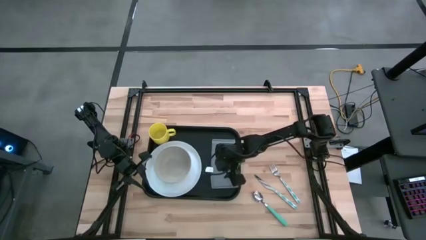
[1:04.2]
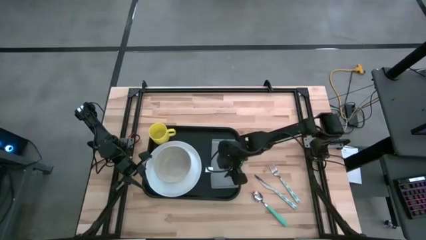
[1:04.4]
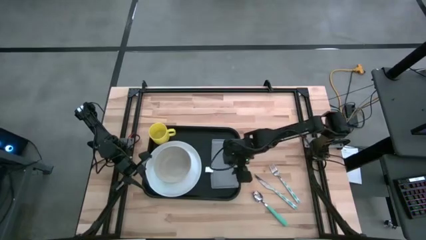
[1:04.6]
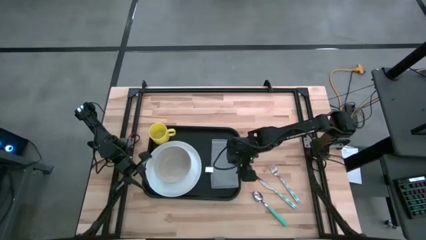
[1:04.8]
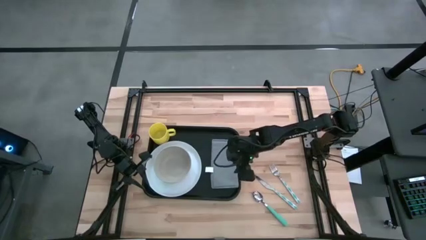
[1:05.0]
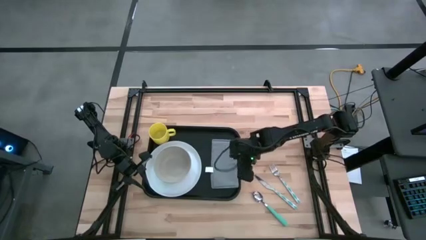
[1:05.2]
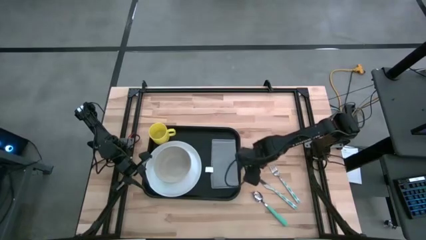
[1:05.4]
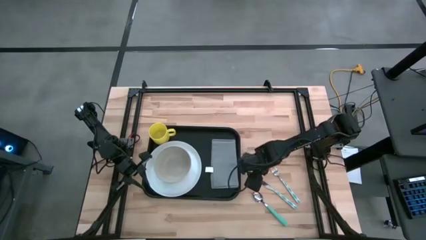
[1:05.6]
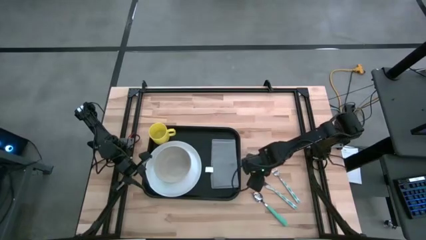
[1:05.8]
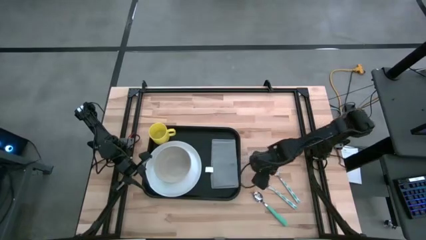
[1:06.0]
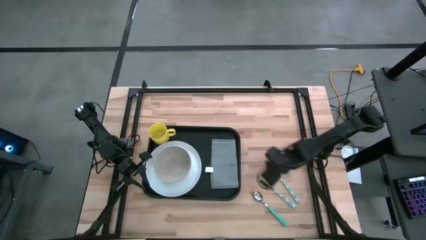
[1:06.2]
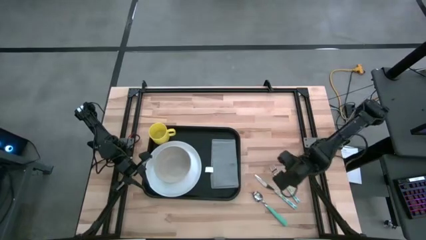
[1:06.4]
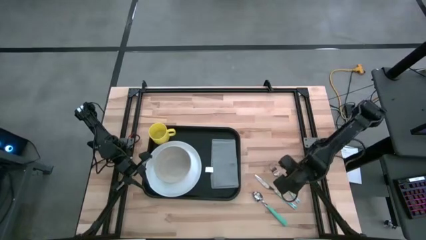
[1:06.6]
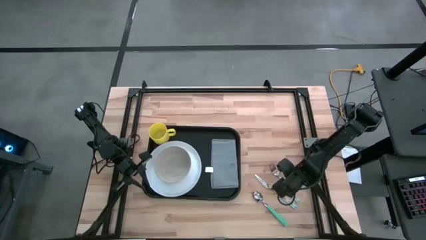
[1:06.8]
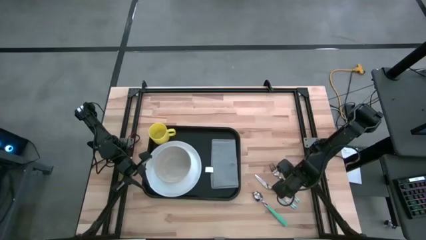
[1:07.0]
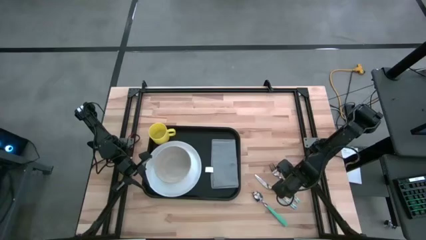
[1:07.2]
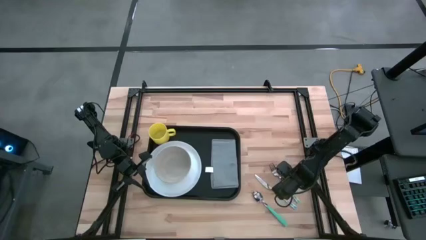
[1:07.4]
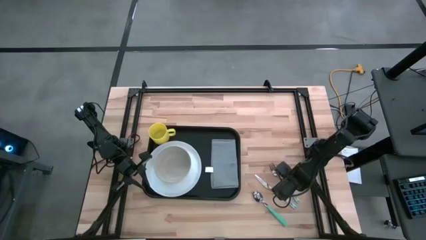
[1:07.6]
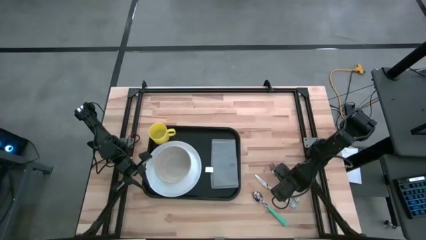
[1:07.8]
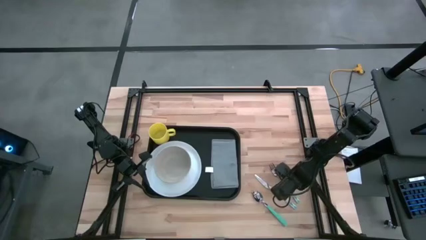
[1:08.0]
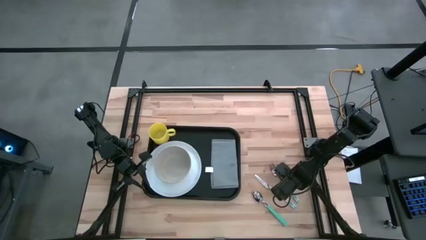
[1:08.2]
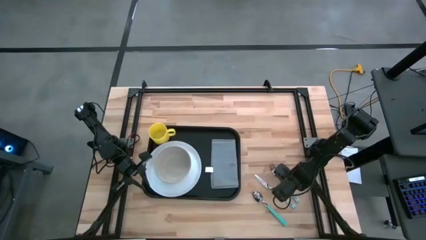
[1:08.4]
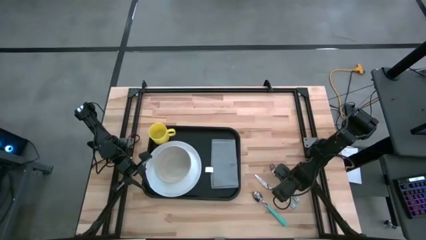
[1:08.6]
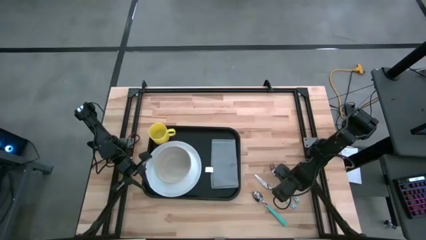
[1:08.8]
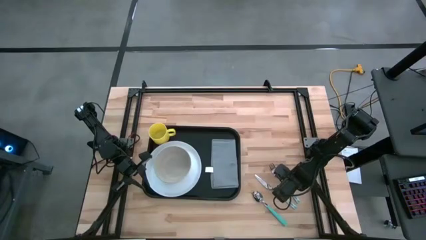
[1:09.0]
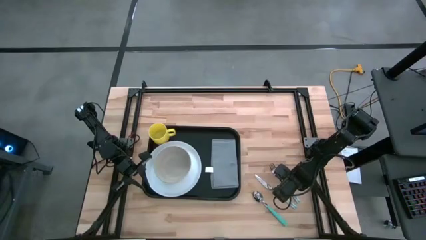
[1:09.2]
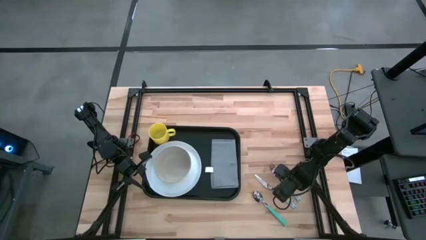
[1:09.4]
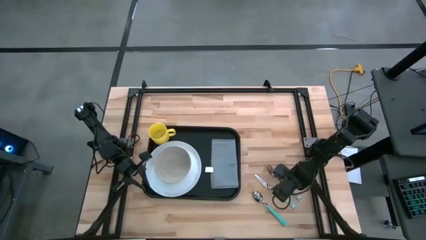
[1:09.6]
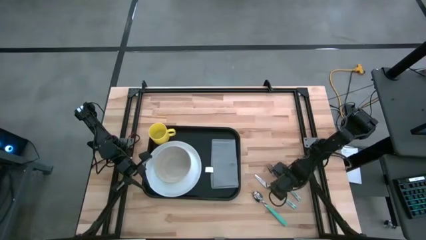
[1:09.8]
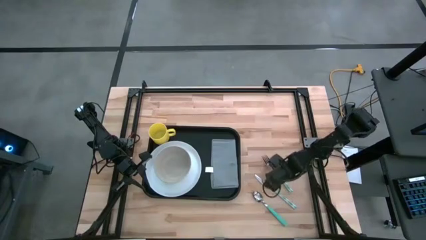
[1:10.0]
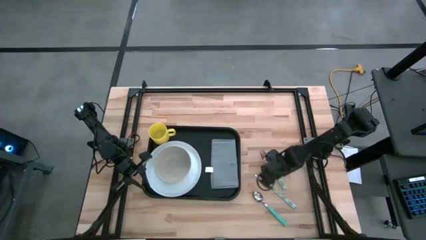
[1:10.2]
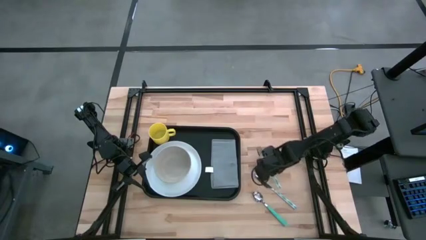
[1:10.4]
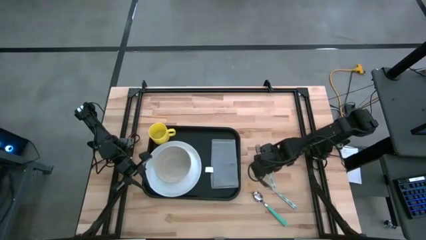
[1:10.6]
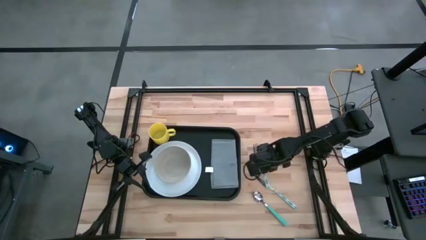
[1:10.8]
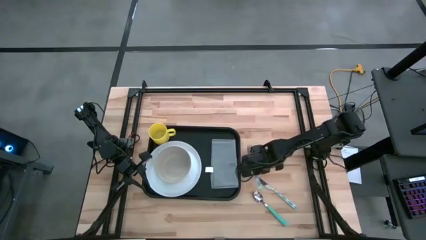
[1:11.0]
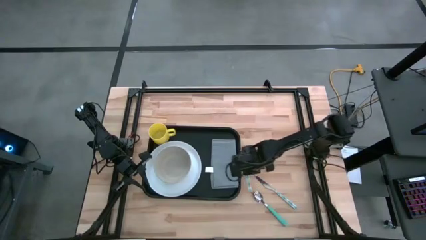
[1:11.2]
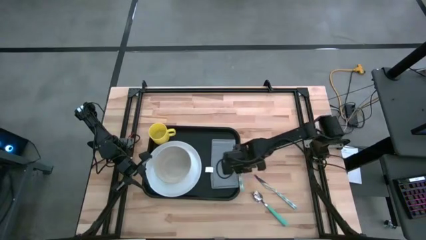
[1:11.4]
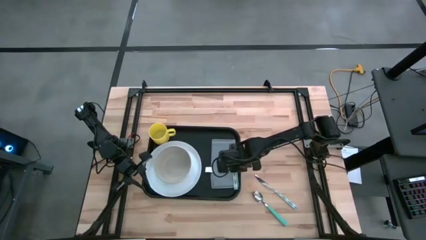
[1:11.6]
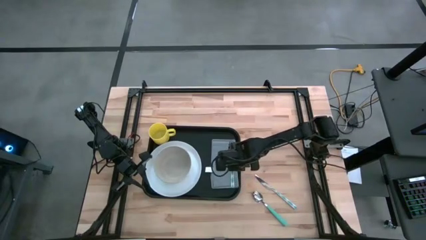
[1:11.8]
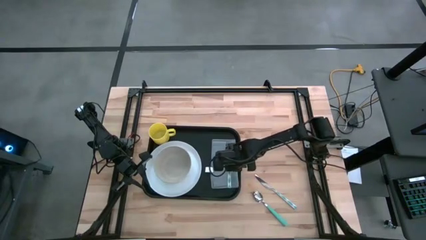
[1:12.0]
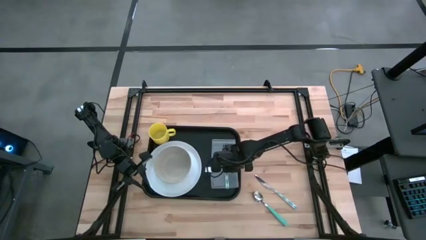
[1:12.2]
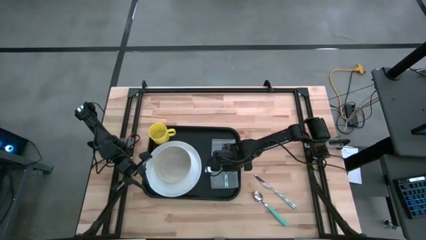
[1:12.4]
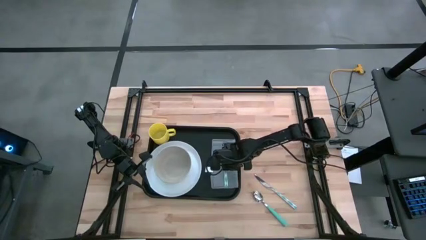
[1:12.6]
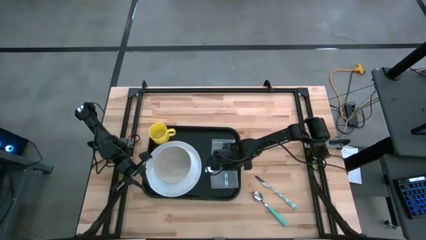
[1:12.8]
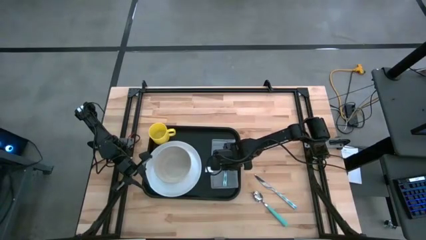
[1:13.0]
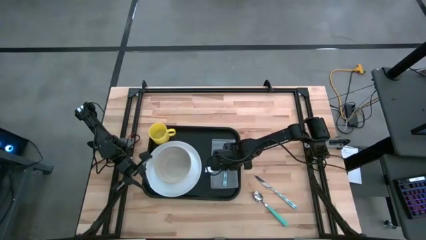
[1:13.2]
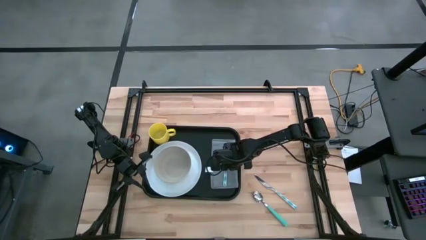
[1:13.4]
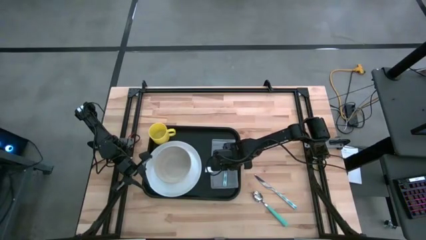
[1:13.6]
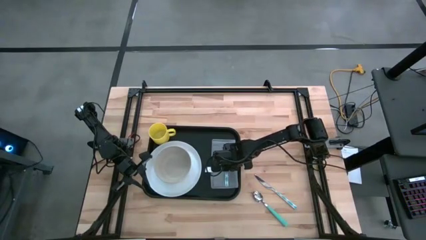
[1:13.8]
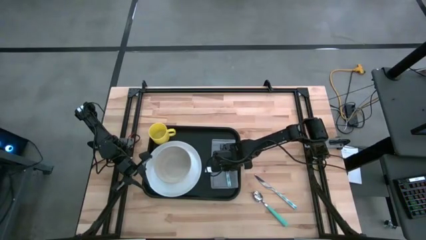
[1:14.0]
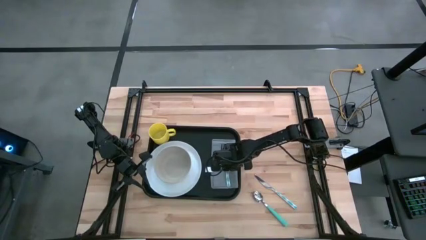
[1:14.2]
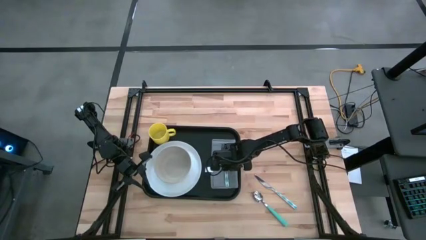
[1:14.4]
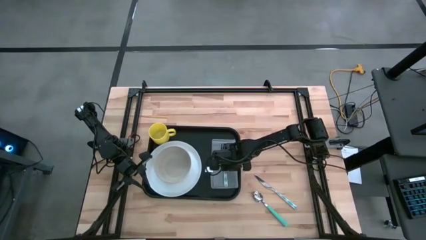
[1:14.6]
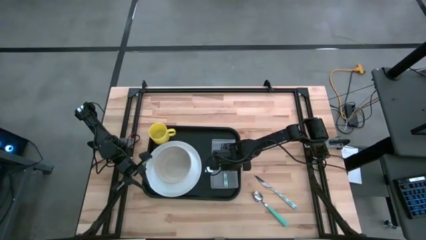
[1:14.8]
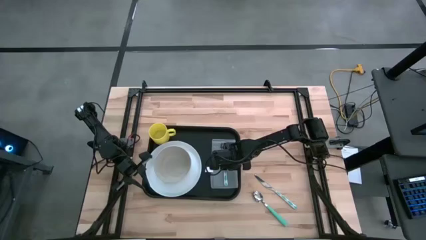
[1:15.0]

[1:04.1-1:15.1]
Task: Set up tray
Put the blue fork on the gray napkin to the right of the white plate

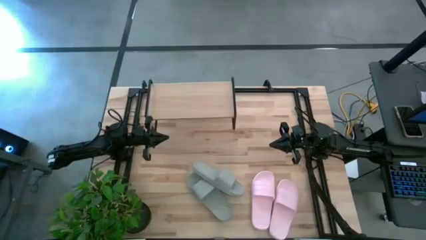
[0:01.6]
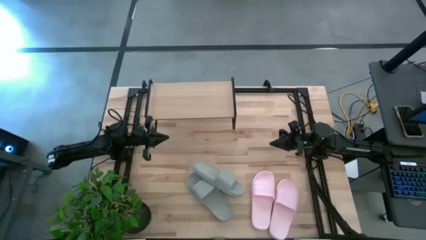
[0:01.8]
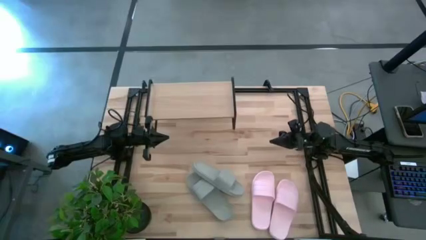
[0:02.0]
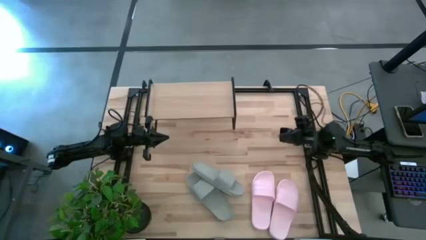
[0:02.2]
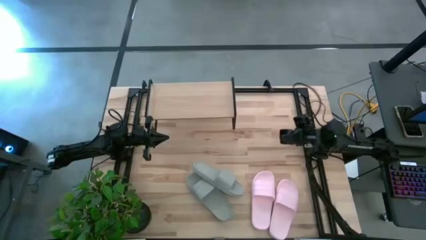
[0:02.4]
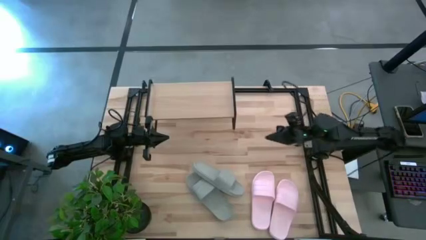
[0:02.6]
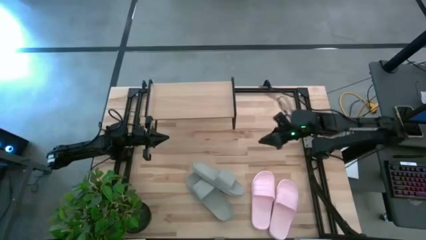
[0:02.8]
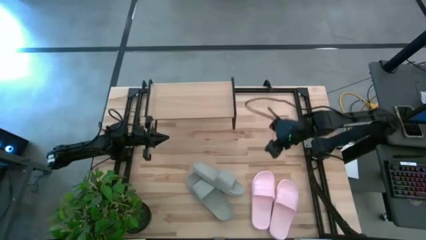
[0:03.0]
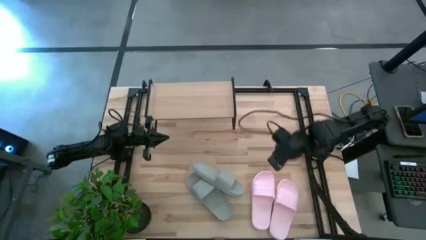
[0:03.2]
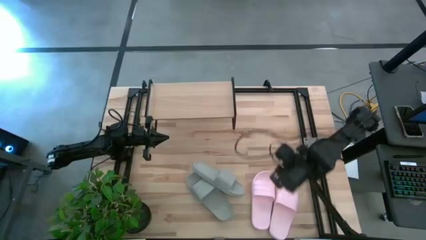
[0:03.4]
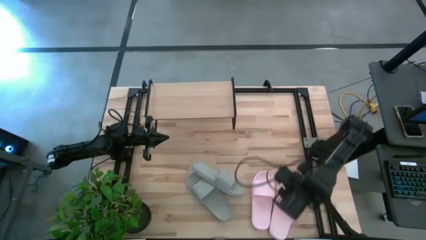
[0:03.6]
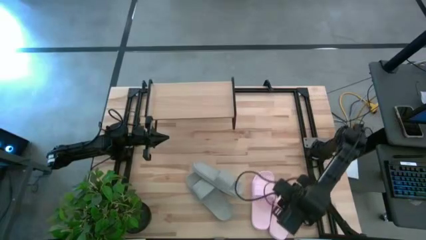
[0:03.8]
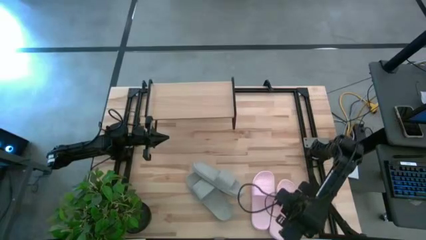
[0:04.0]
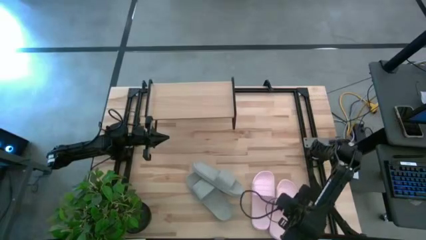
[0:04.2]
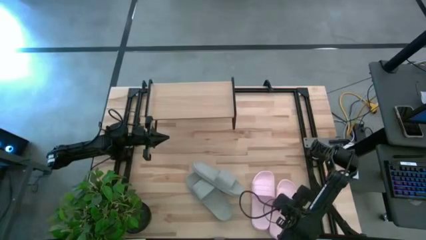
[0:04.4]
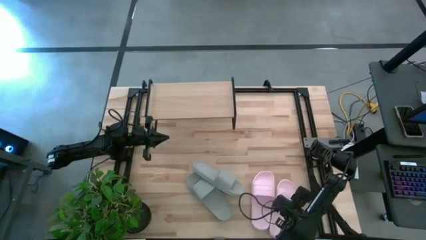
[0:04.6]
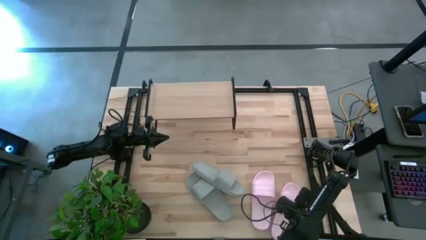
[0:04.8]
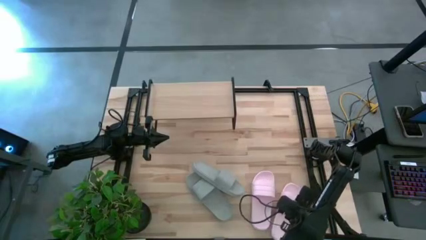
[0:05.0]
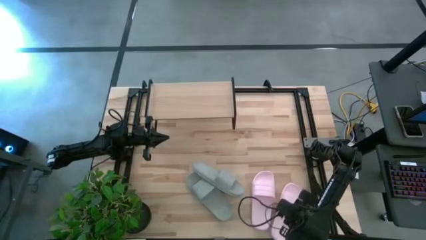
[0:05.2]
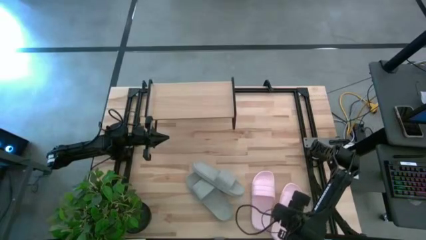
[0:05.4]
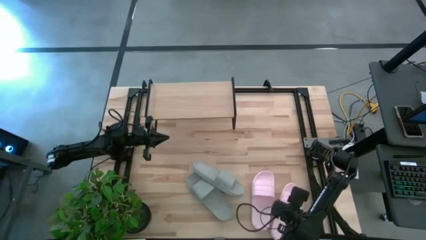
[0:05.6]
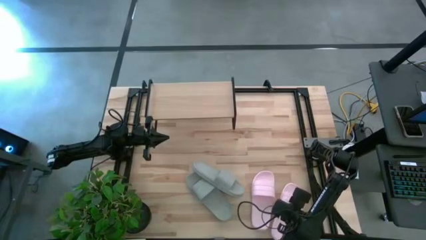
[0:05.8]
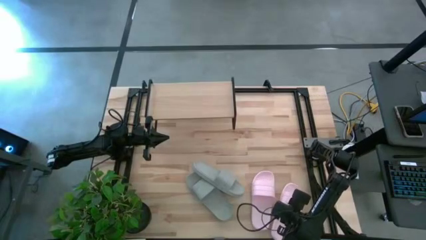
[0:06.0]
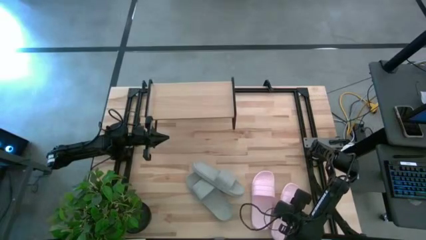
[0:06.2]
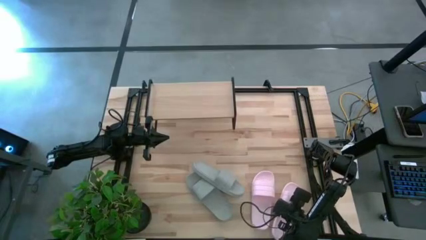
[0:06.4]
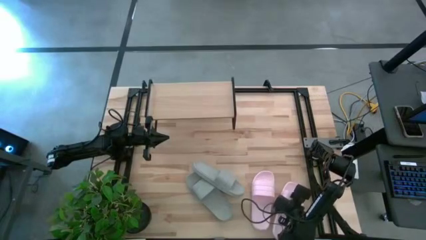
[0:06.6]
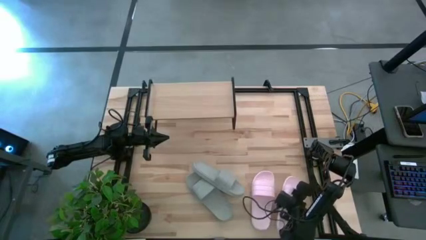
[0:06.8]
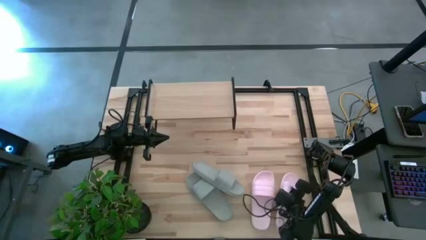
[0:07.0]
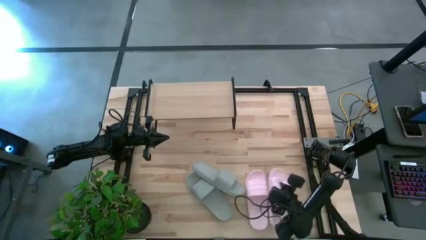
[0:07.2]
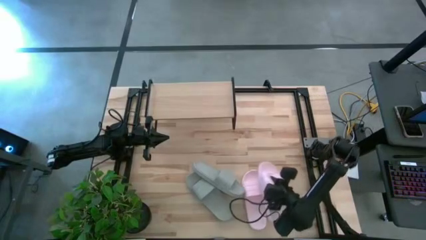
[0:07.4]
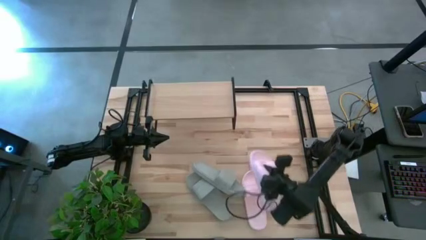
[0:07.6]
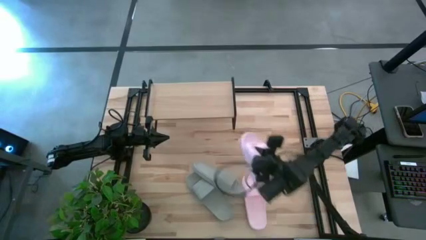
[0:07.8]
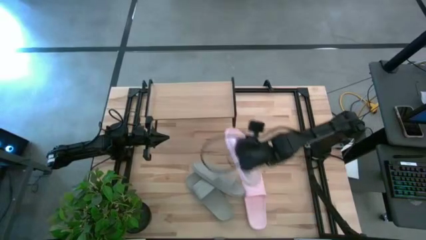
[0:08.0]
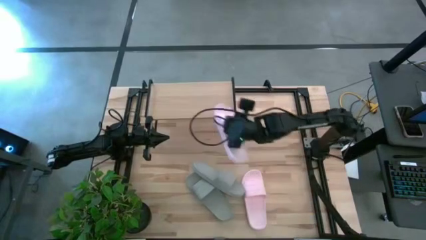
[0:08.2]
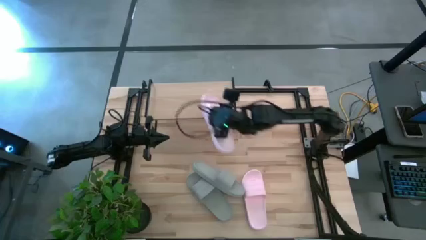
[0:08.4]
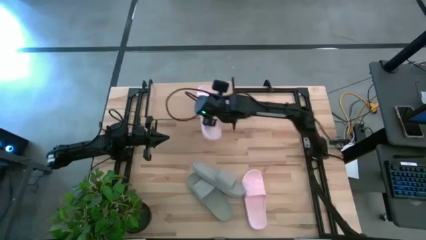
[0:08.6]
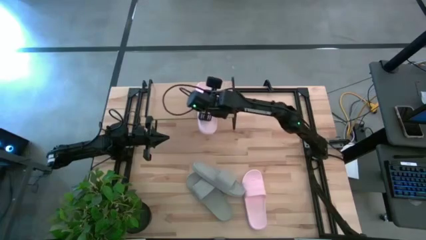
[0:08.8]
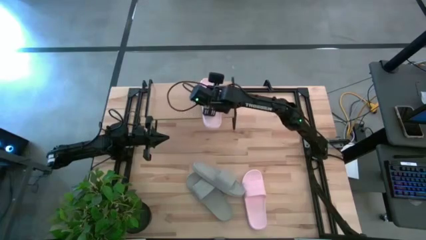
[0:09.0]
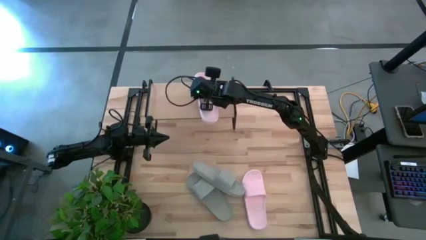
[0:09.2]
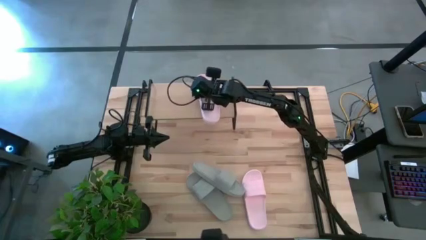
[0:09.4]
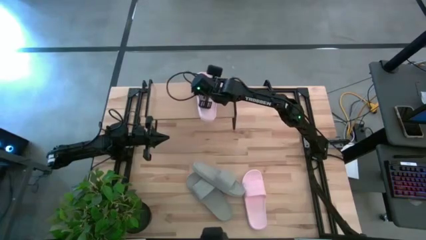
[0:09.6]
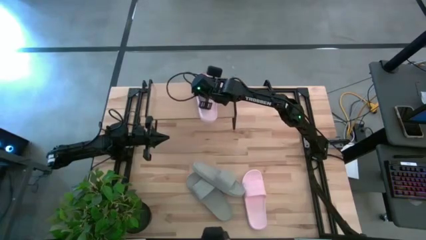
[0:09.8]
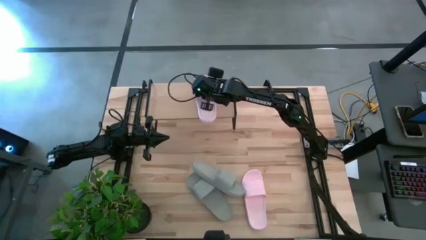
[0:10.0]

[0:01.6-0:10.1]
Task: Pick and place slides into the shelf
Put the right pink slipper on the shelf
